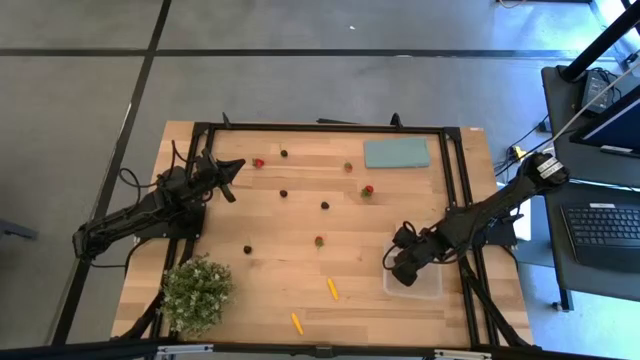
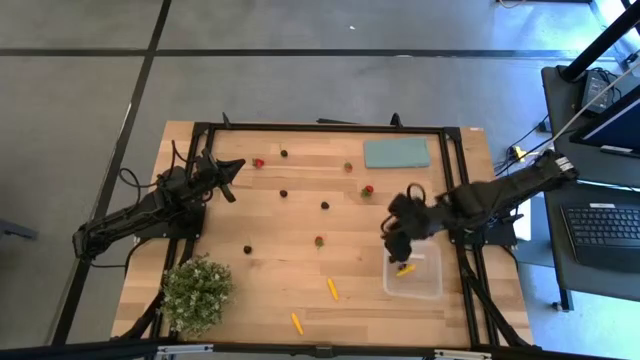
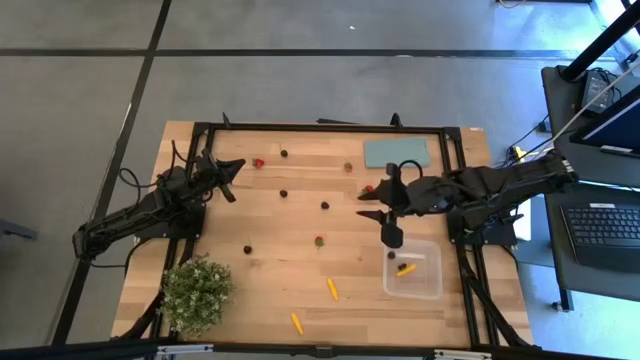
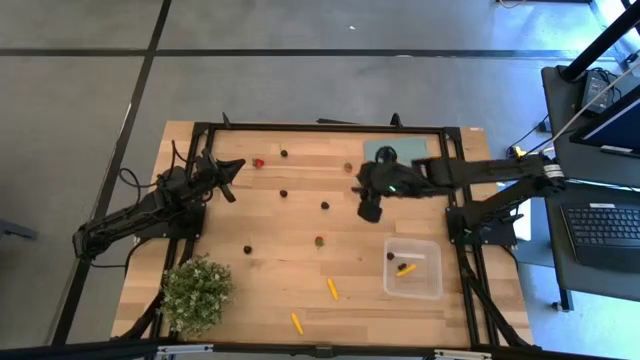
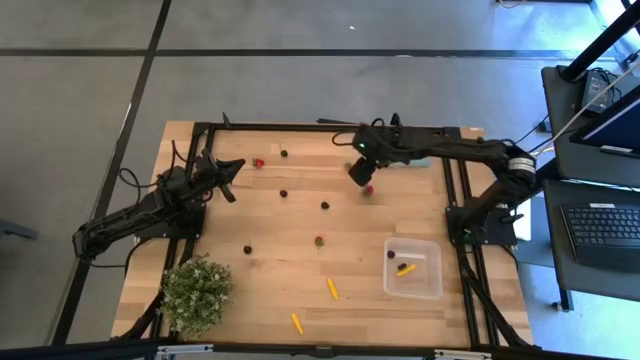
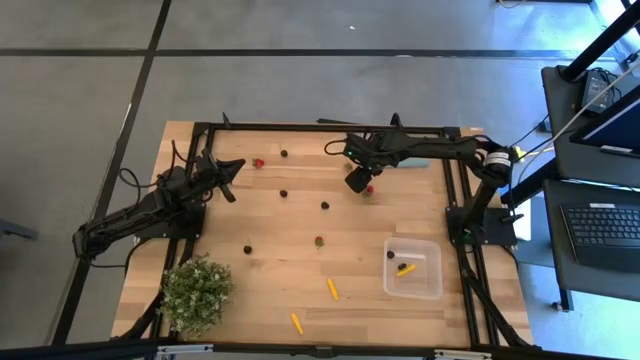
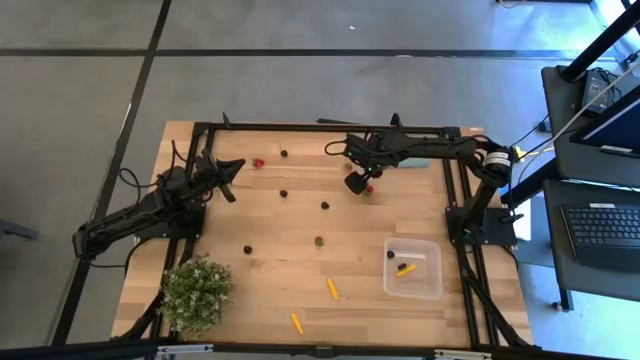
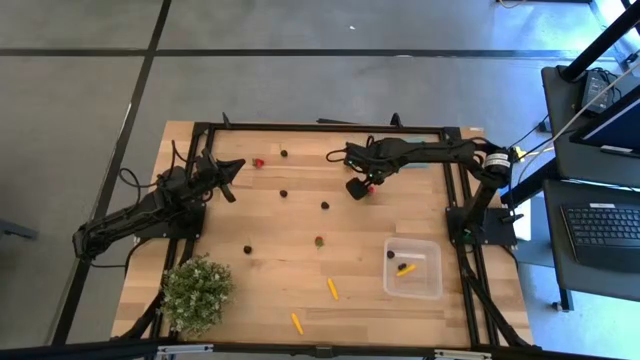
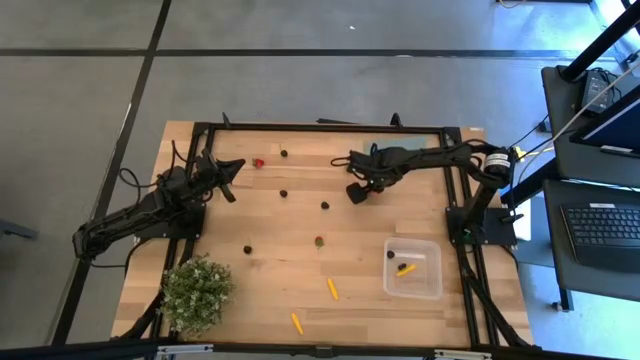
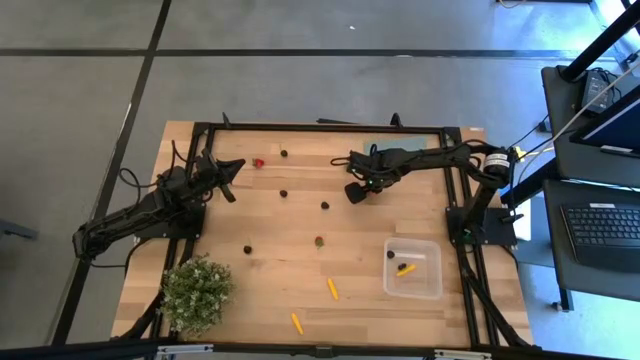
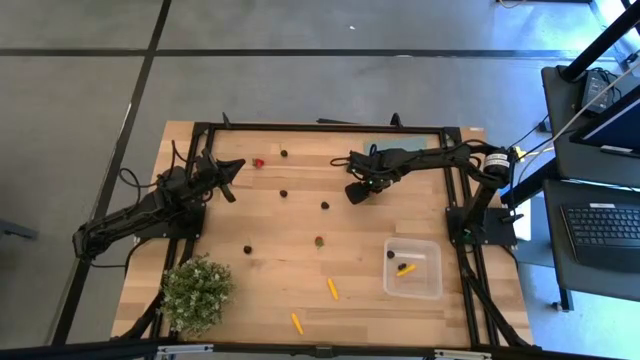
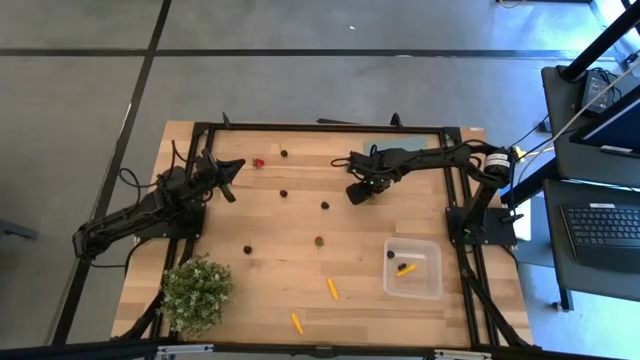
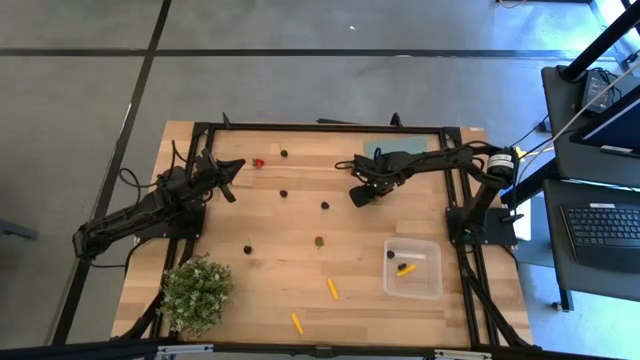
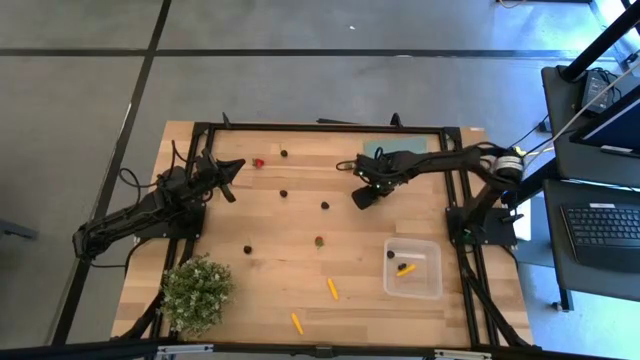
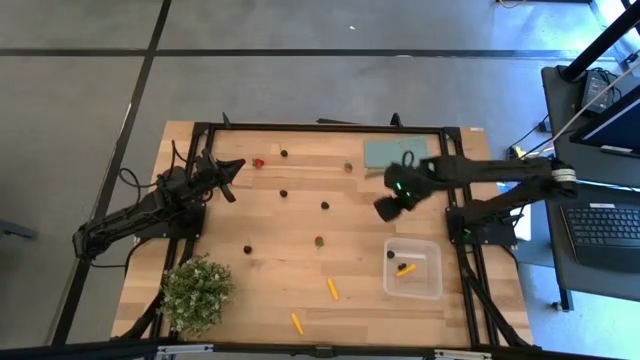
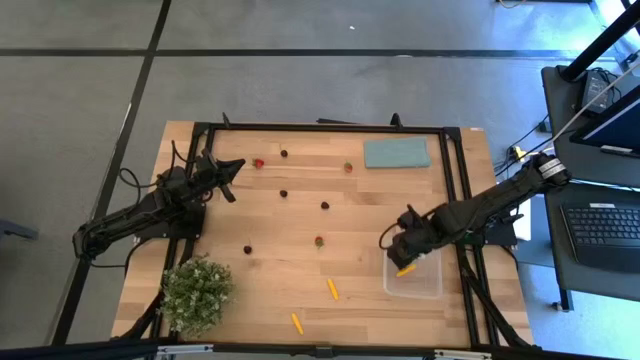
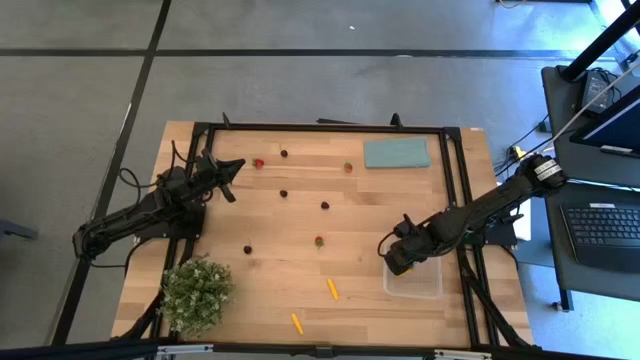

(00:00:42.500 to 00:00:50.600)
Task: Pick and placing Produce into tupperware
Put the strawberry into the container

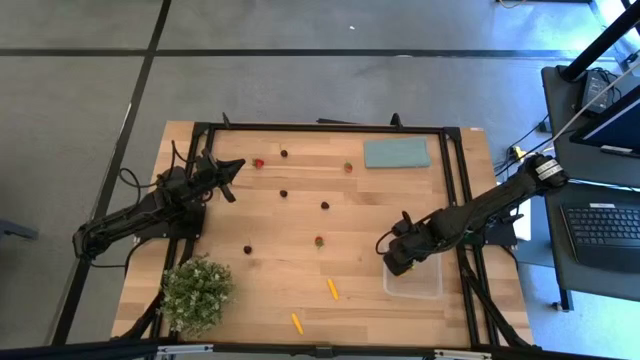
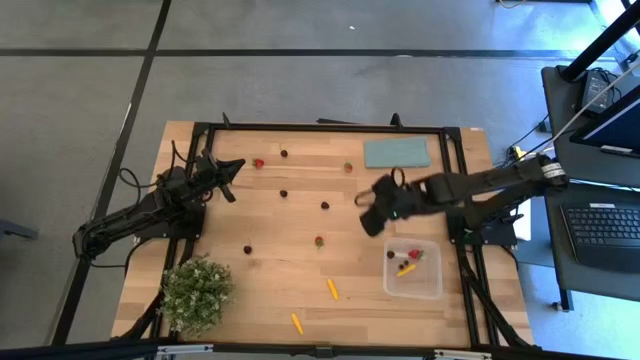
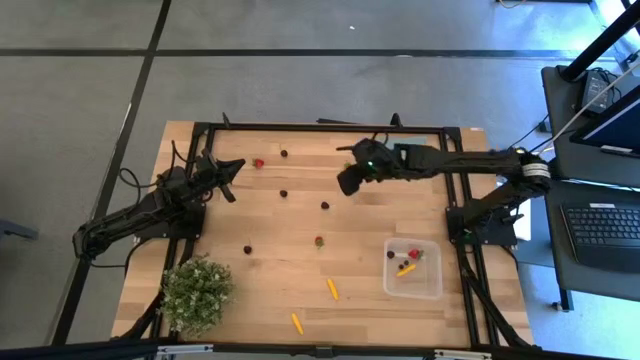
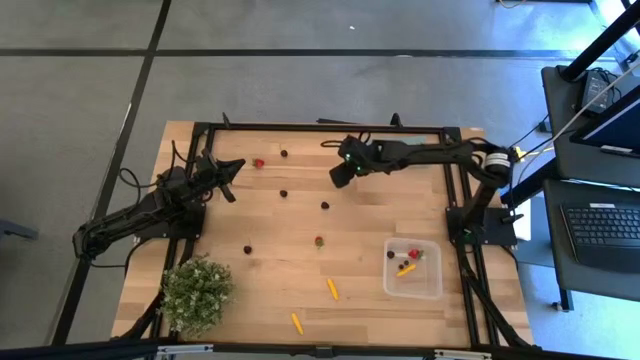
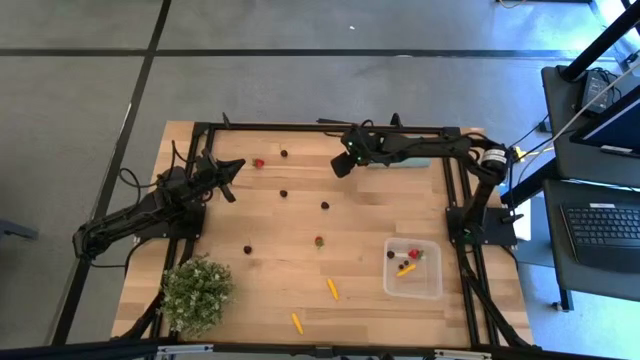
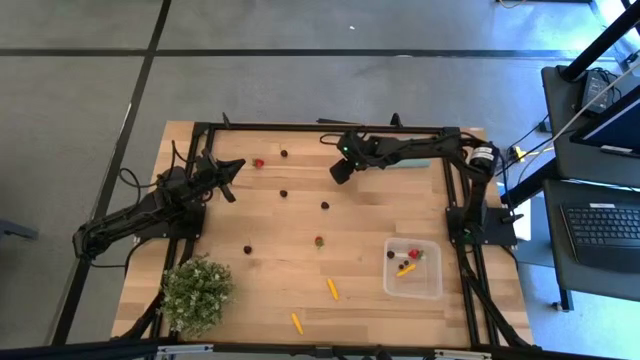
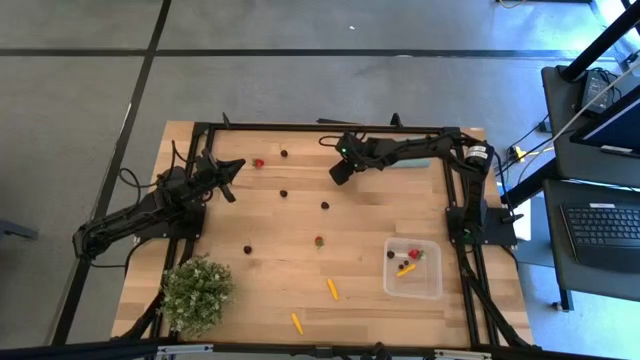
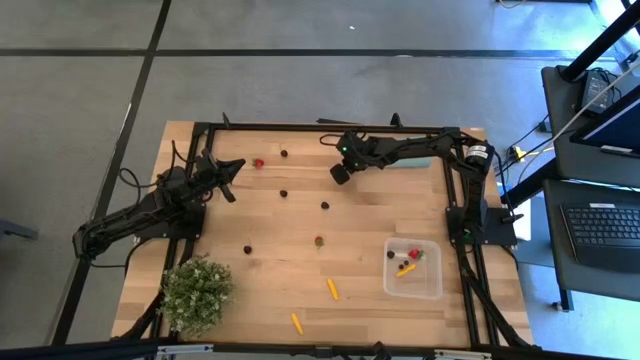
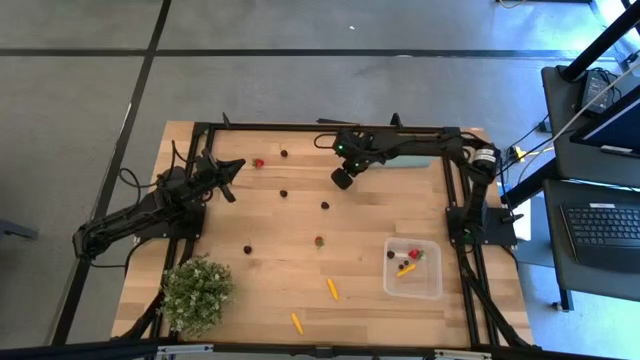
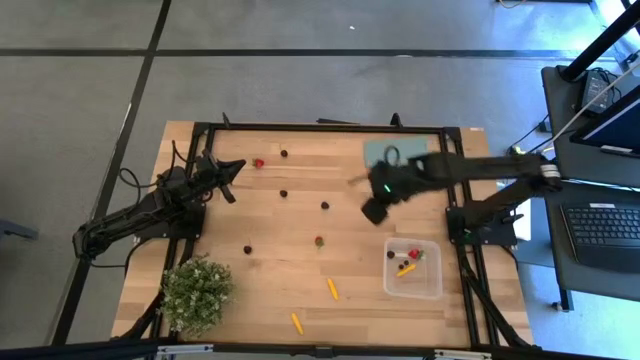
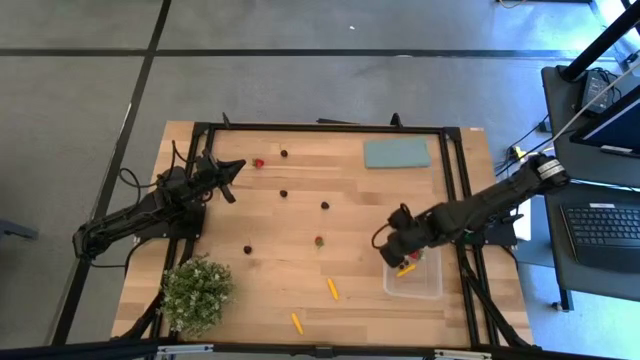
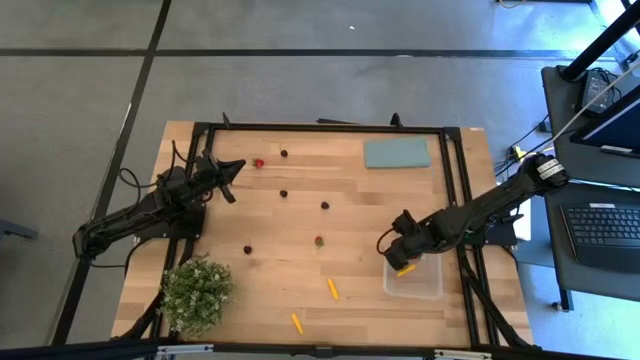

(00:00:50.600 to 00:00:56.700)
Put the top right strawberry into the container

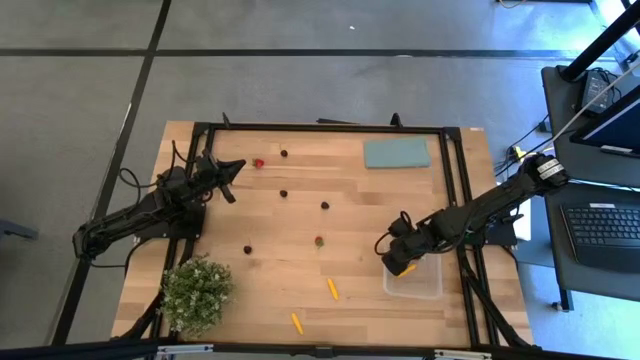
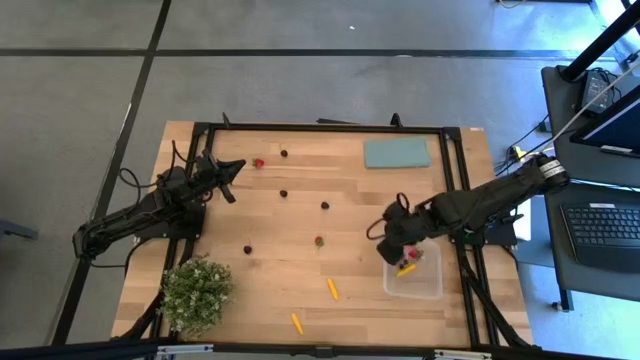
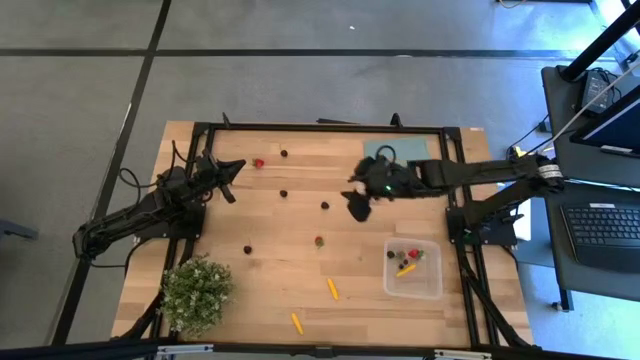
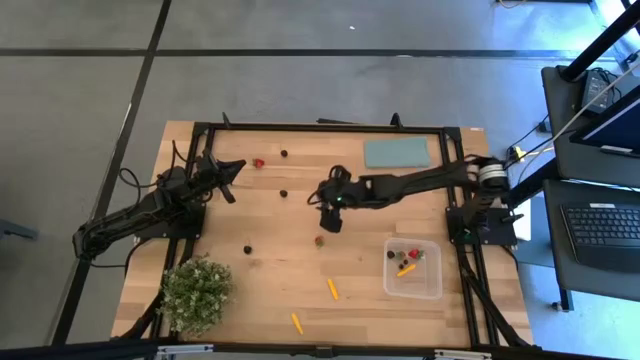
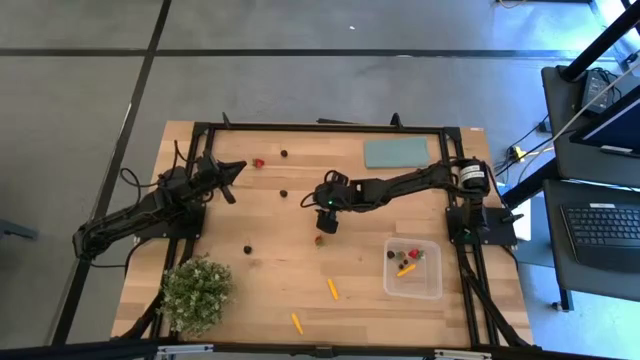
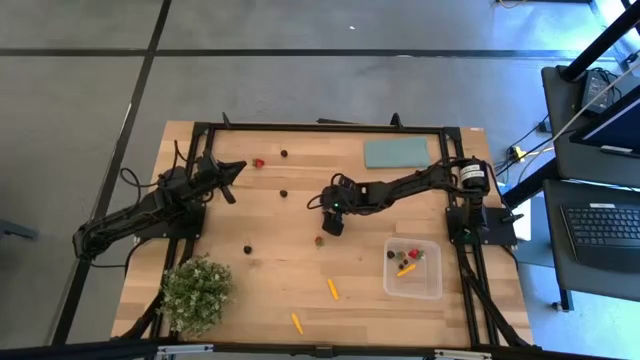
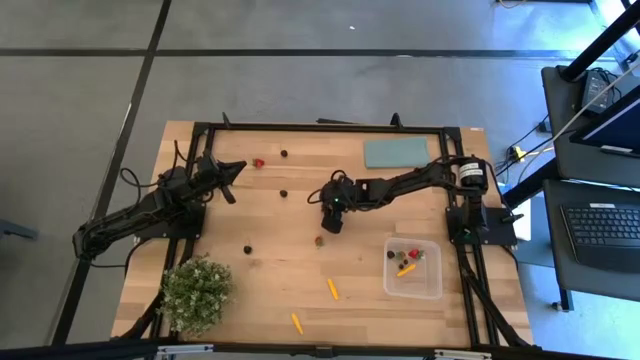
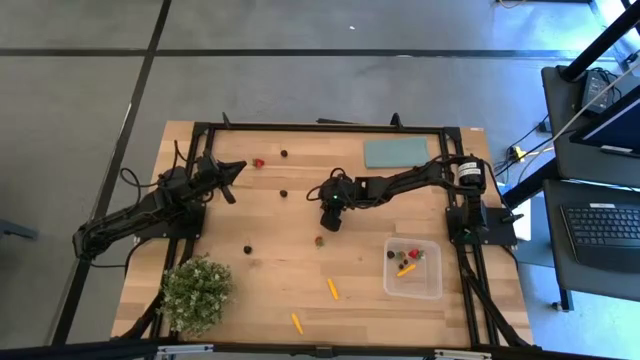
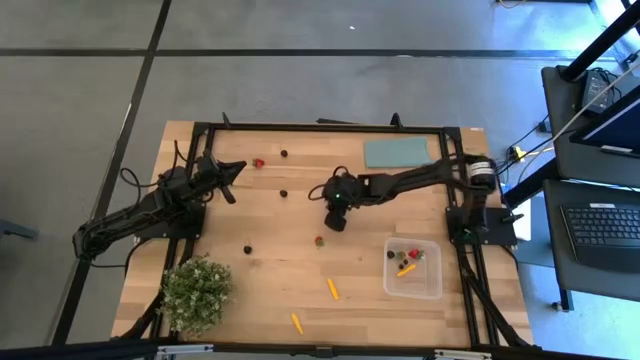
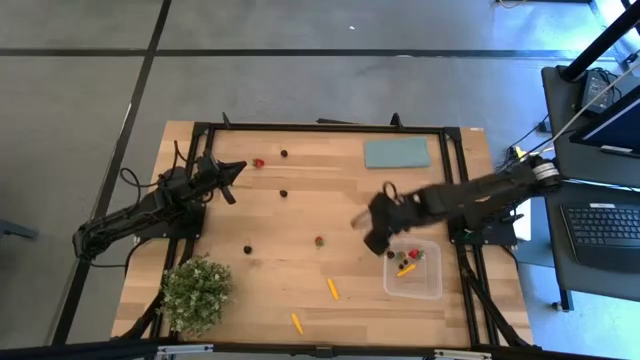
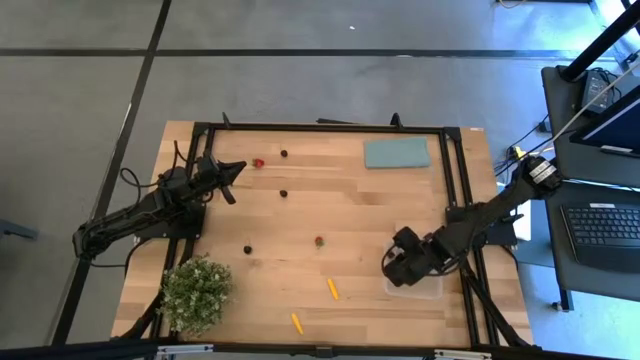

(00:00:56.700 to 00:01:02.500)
Put the right blackberry into the container
